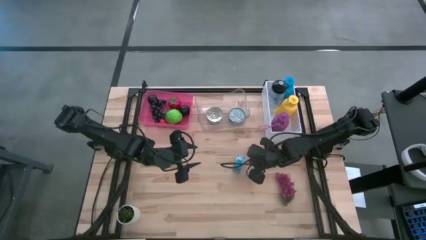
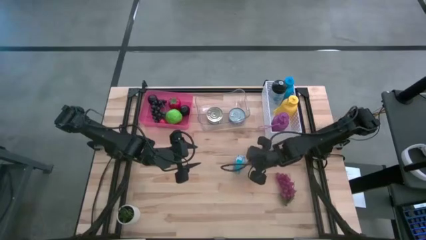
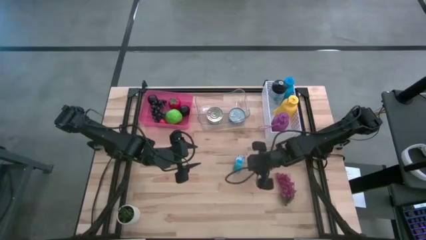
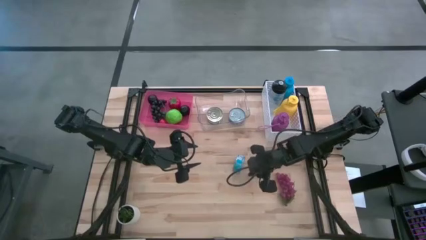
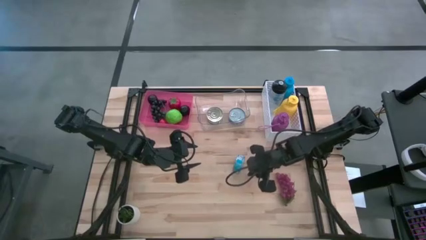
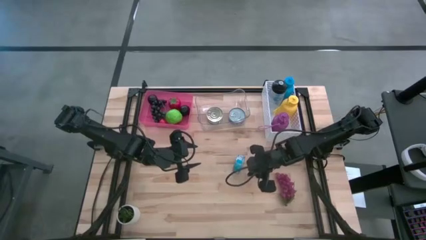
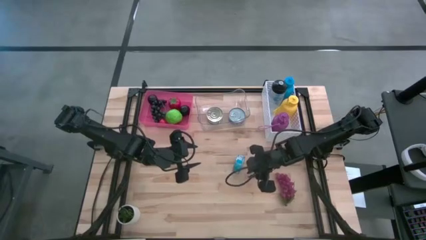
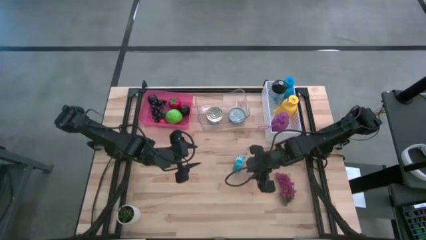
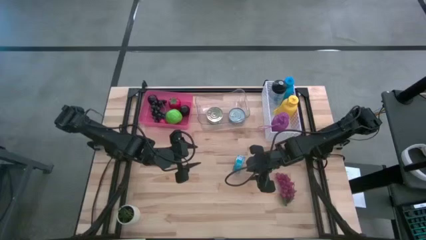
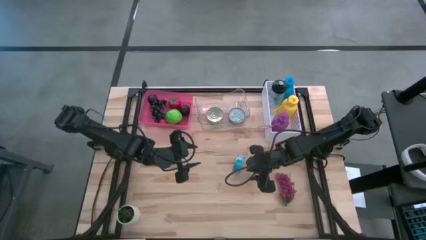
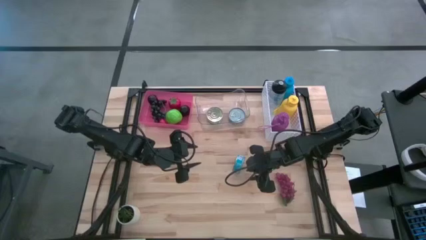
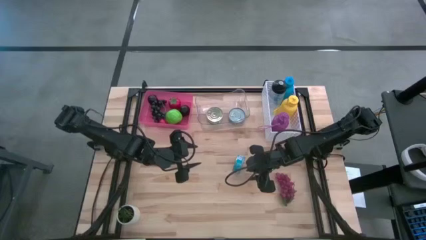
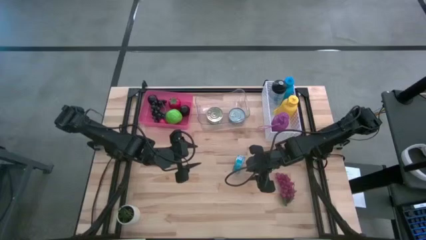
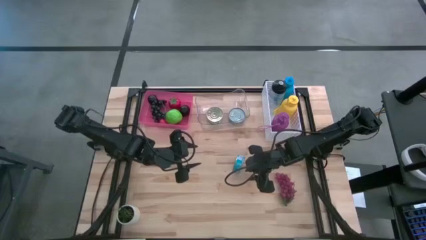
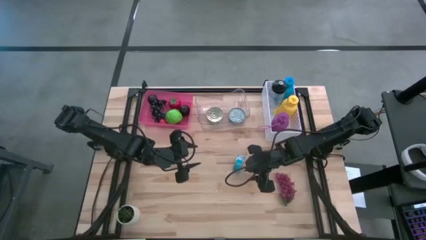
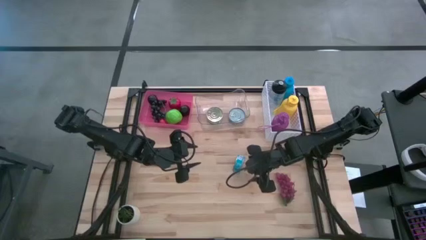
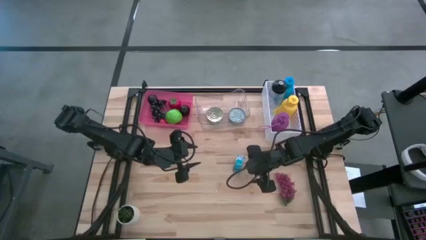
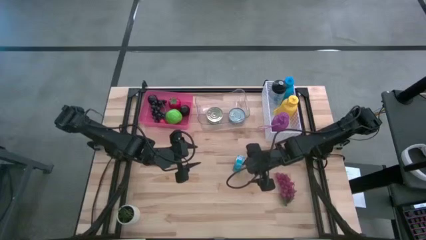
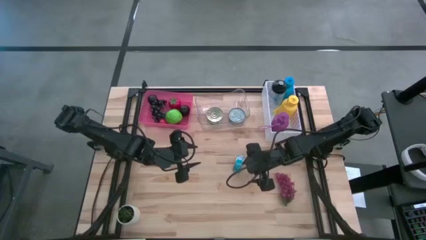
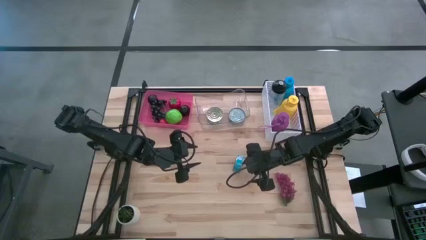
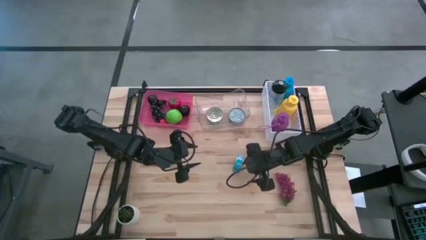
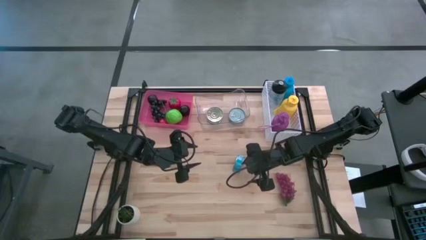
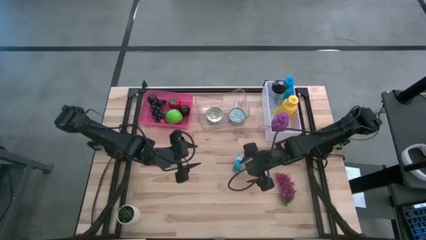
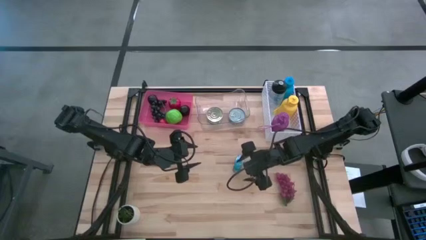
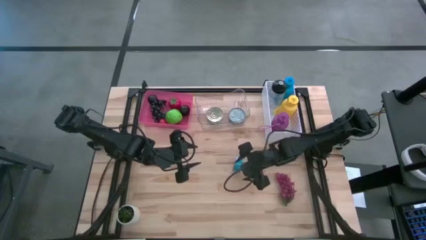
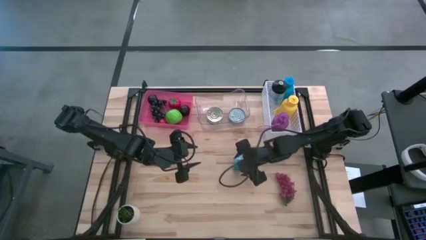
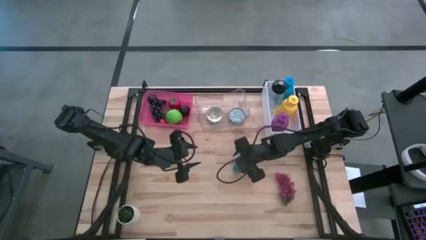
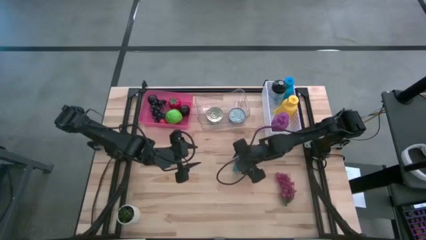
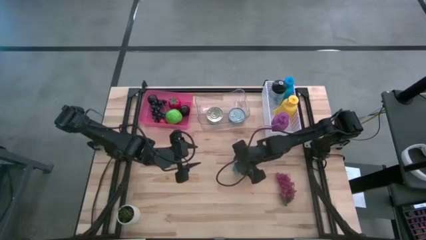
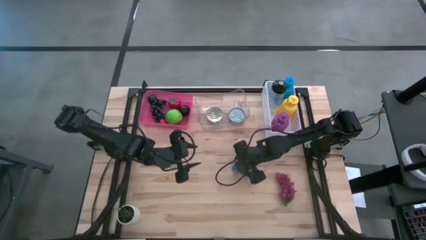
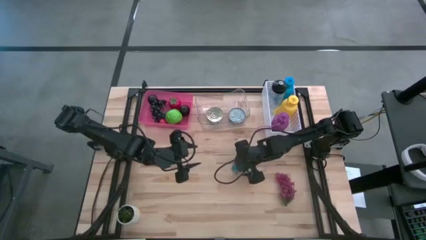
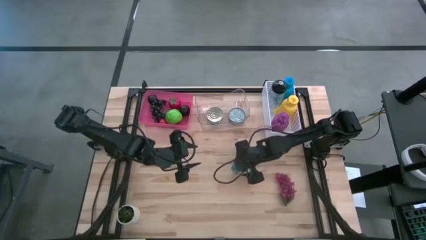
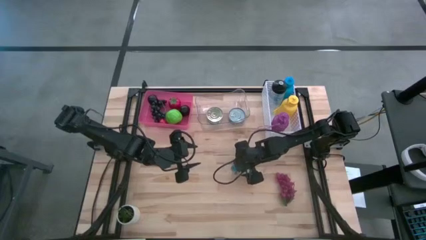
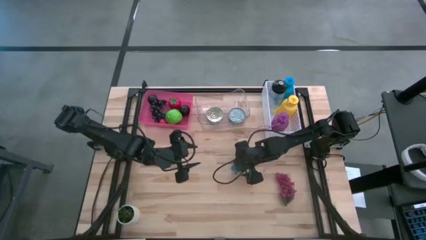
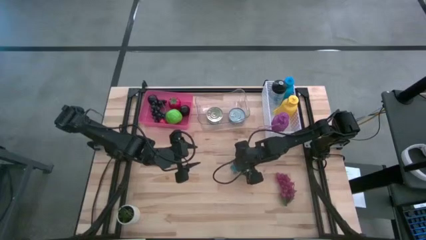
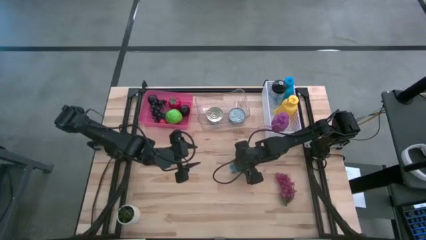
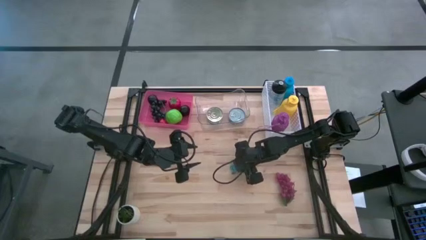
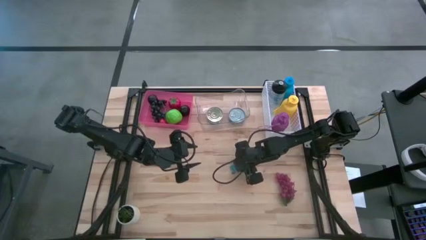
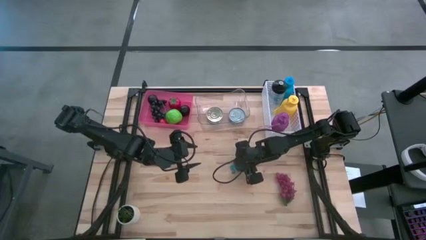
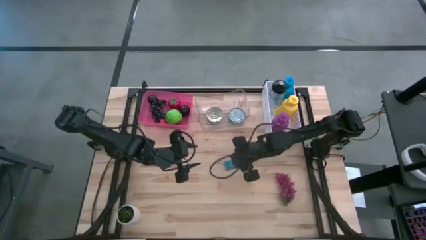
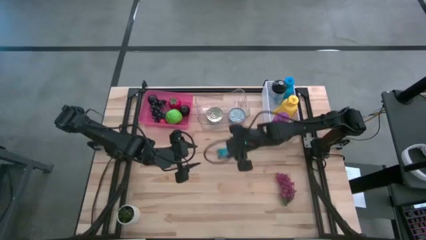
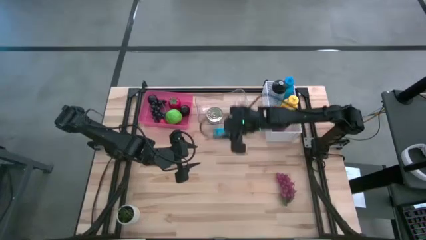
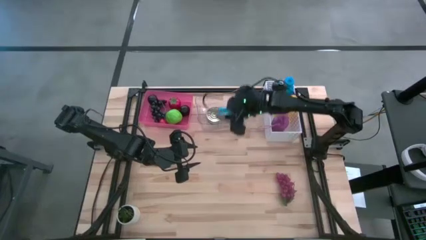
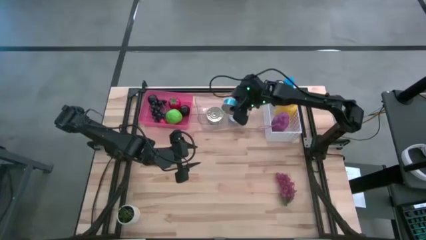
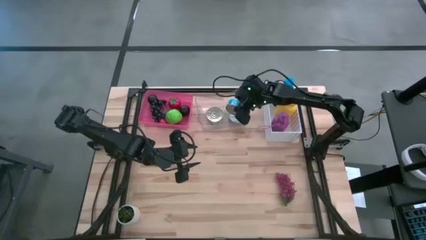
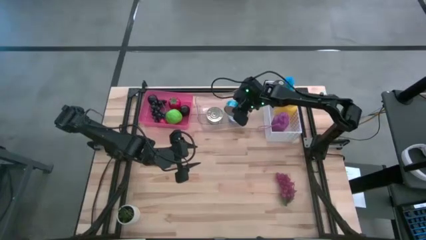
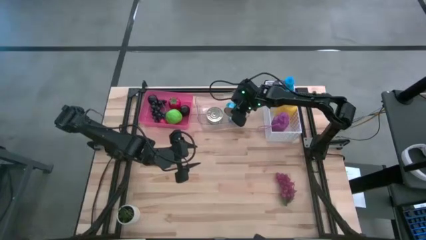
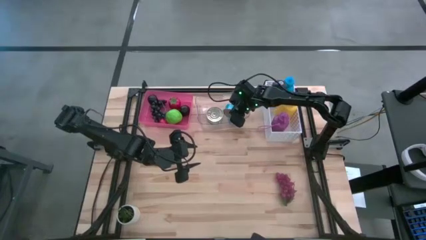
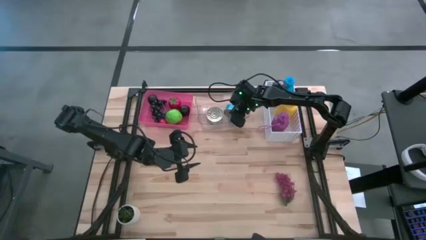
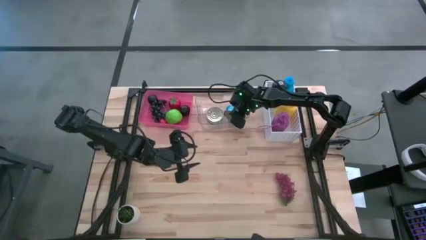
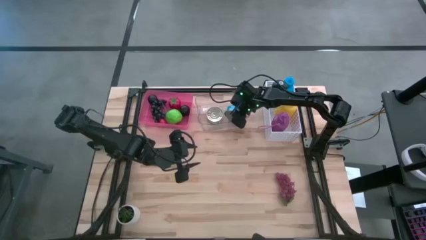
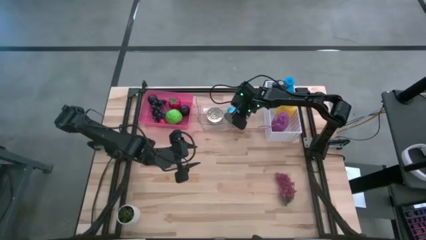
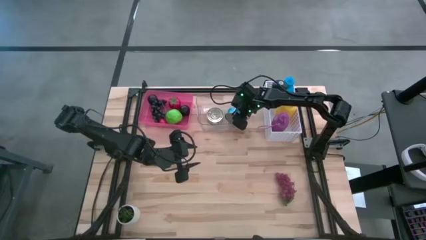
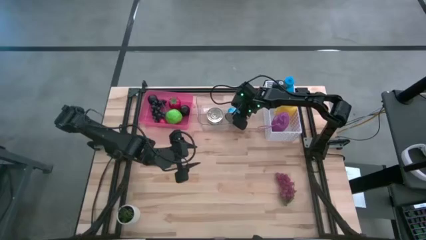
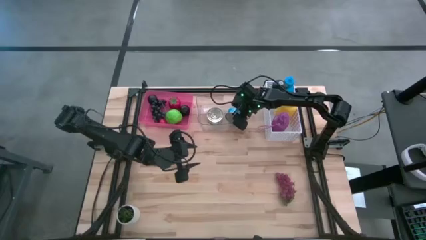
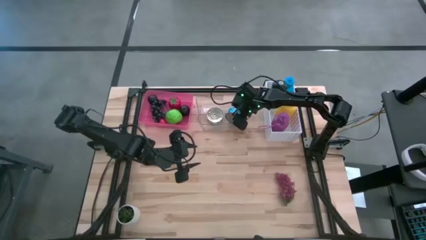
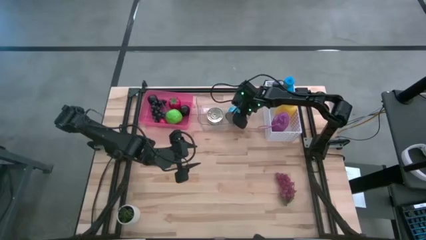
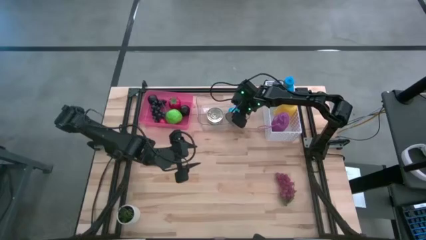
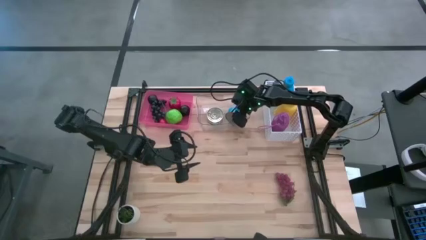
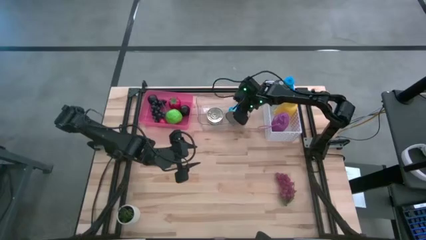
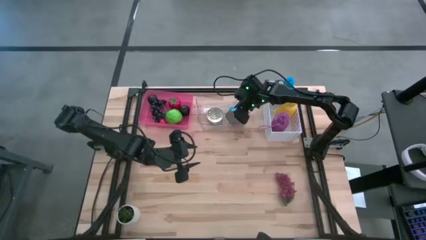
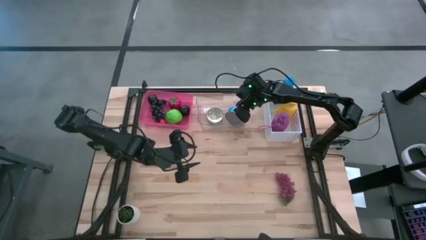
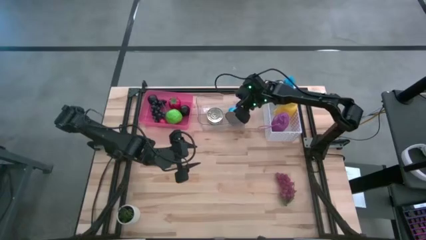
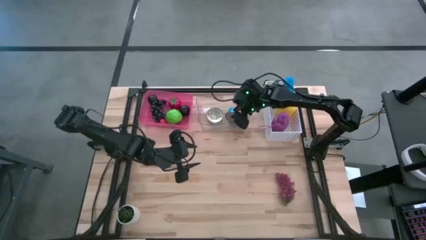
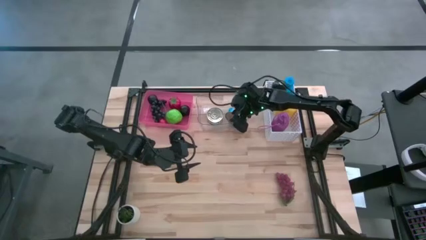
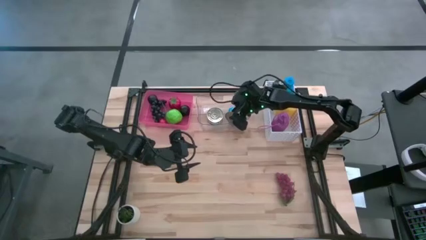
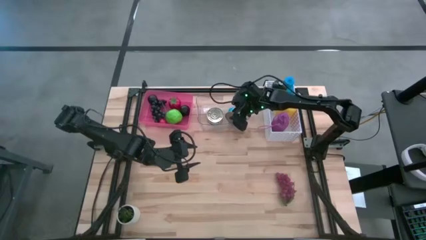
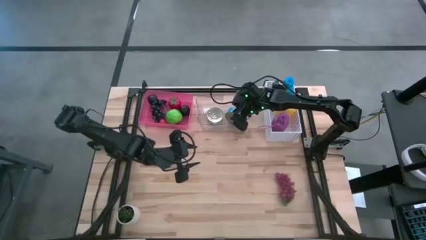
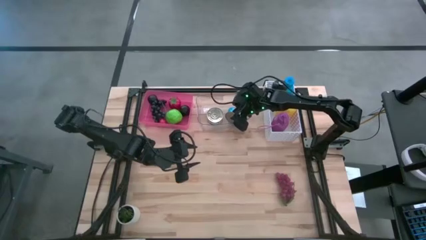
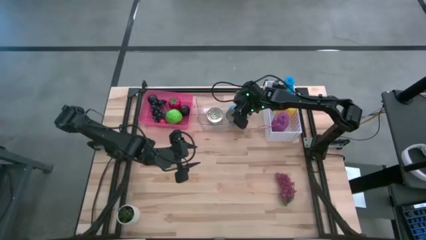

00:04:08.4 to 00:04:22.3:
Task: Pick & Place Food Item
Put the blue tuna can into the transparent bin
